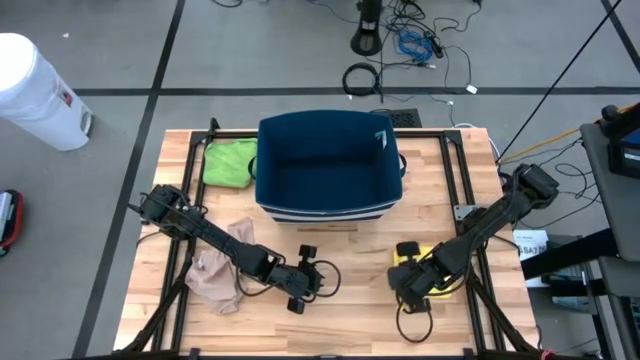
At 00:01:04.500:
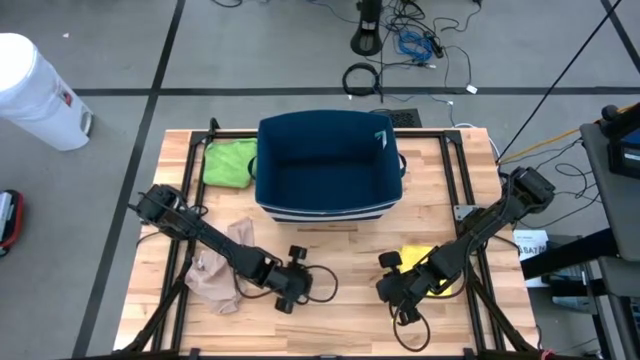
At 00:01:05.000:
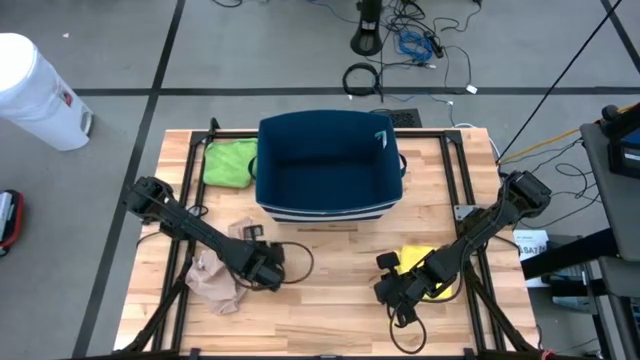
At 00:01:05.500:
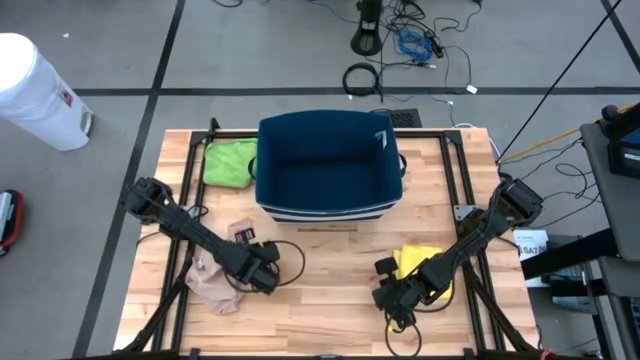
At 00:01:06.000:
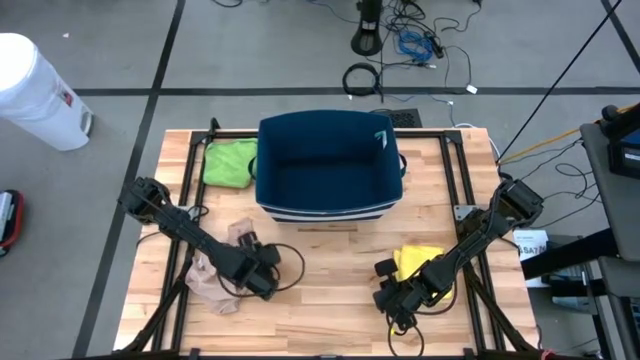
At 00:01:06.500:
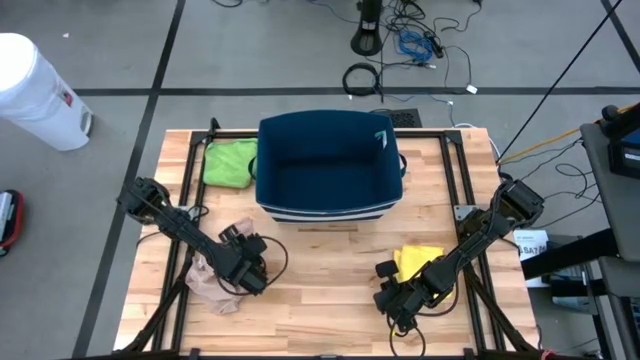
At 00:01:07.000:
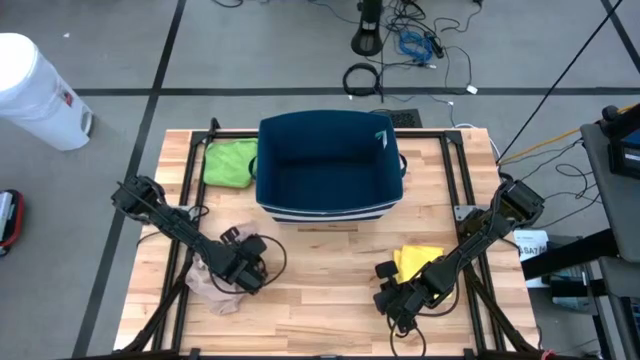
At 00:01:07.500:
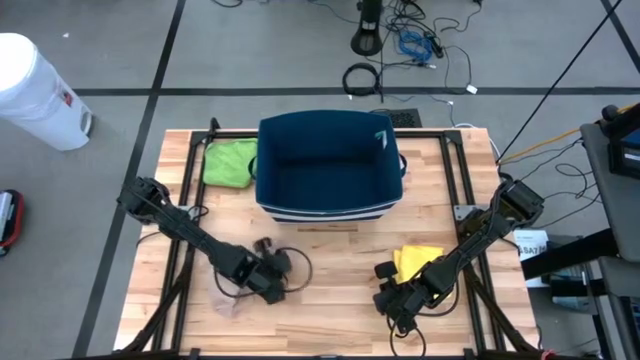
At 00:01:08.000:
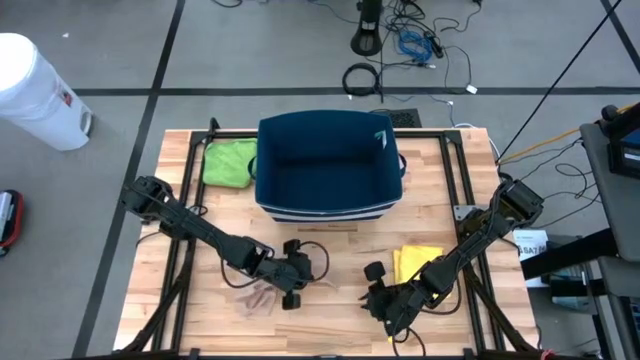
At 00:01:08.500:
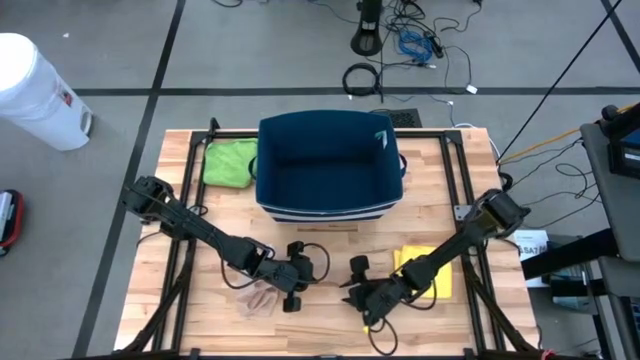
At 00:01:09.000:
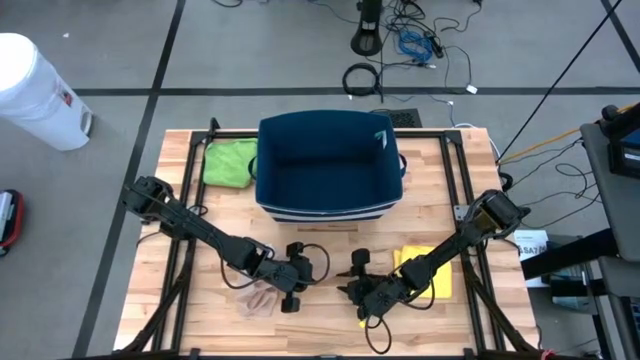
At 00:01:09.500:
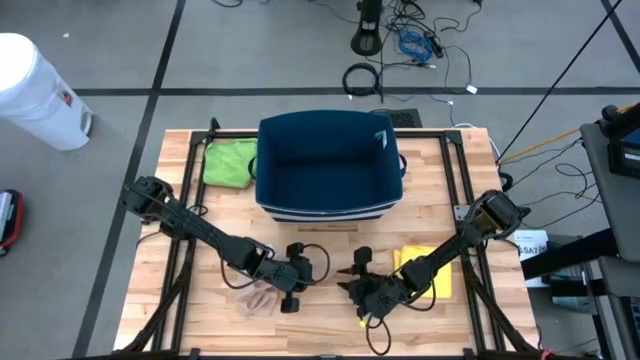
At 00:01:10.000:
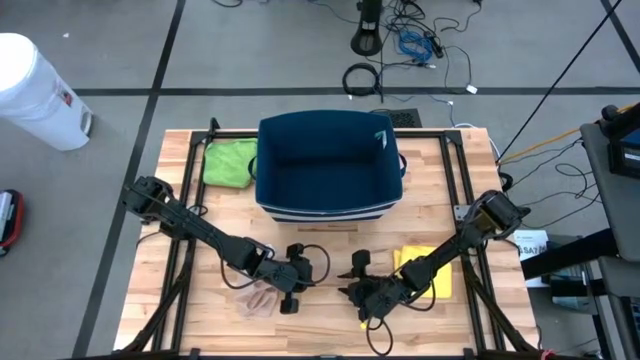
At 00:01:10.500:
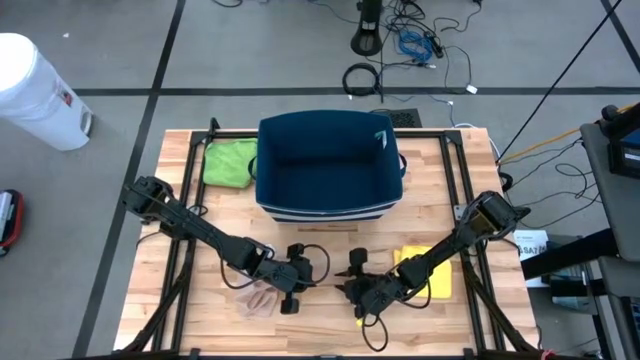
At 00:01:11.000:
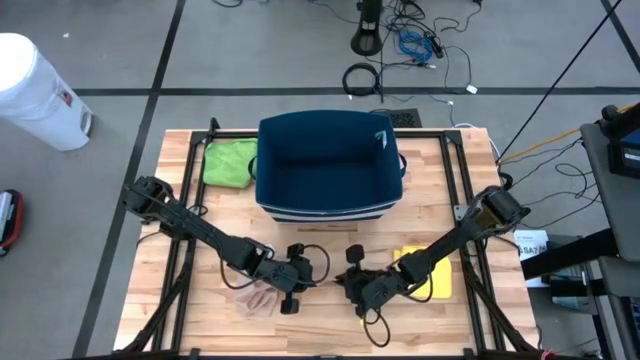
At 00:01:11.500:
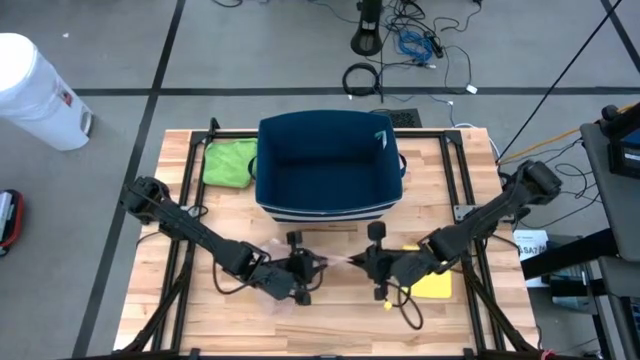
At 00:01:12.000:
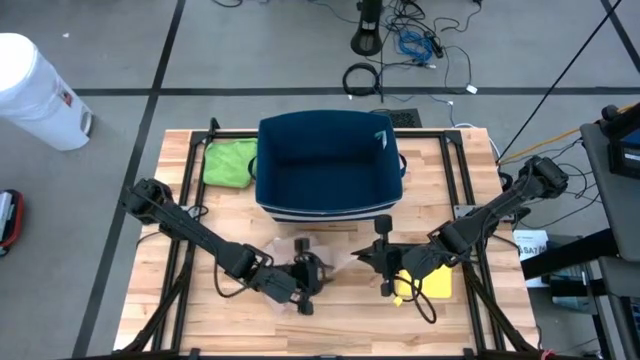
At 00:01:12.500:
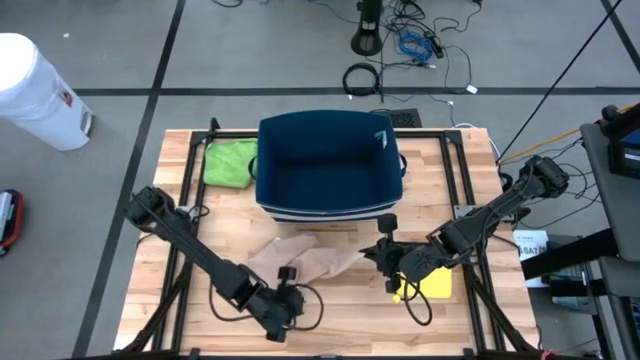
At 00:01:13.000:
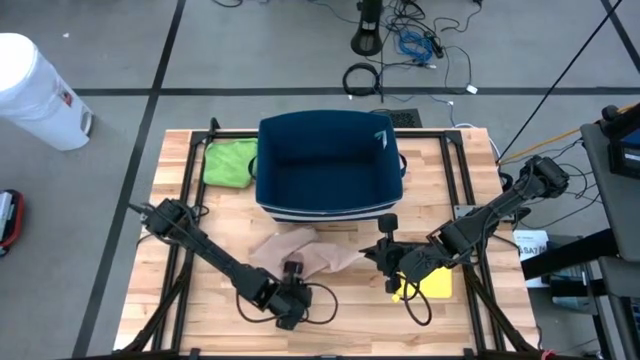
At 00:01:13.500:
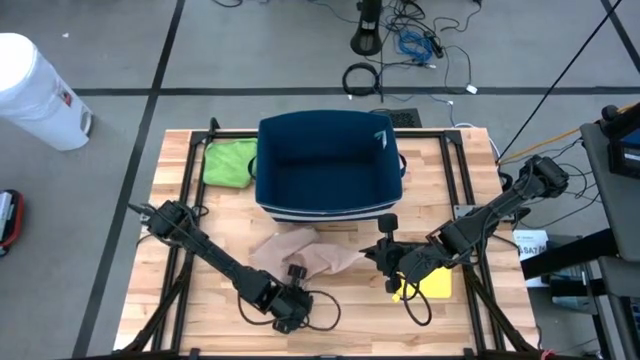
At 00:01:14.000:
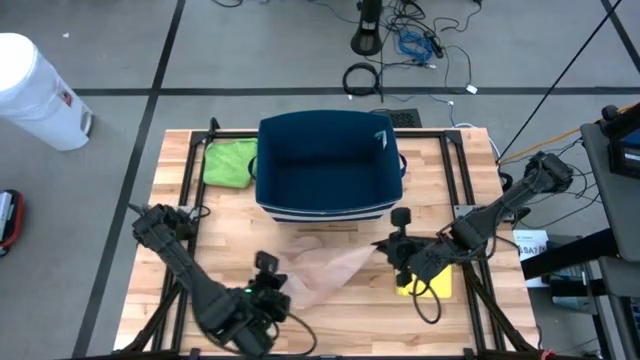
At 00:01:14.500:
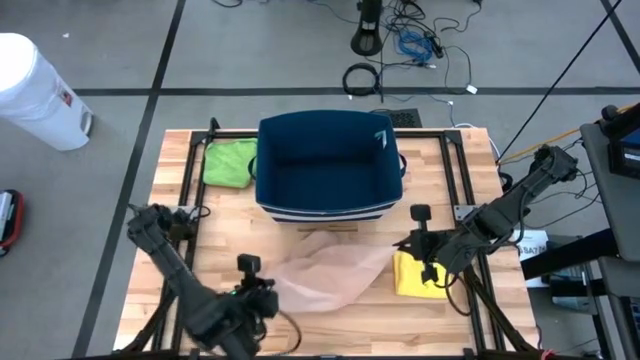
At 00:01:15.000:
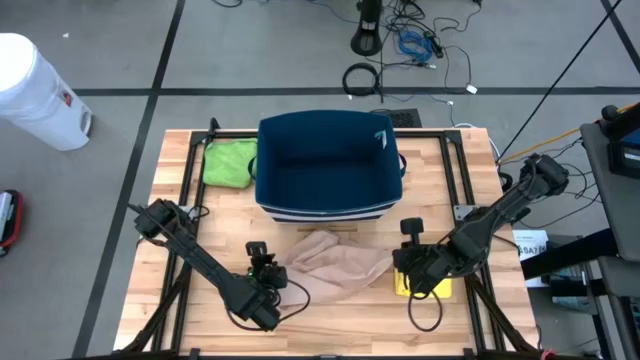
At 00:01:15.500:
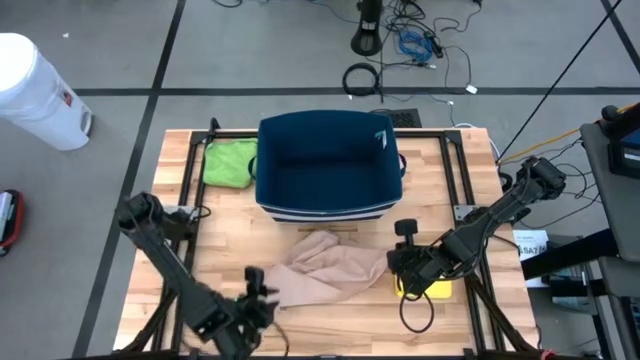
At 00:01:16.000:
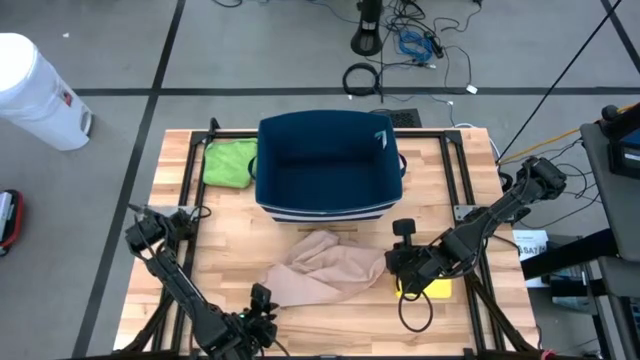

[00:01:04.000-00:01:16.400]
Task: Fold towel
Fold the light brown towel

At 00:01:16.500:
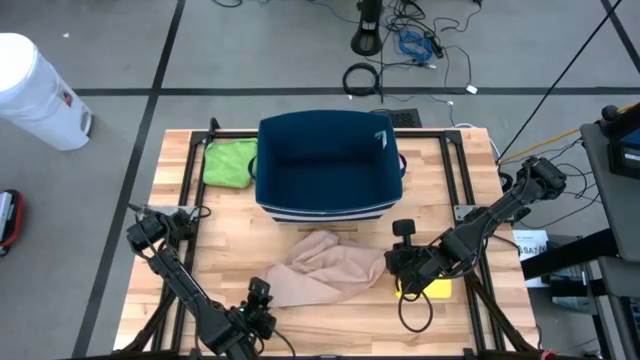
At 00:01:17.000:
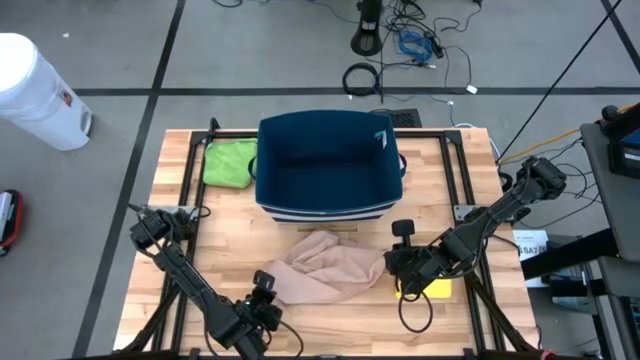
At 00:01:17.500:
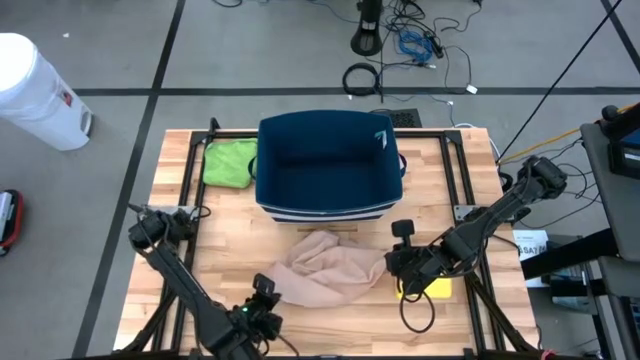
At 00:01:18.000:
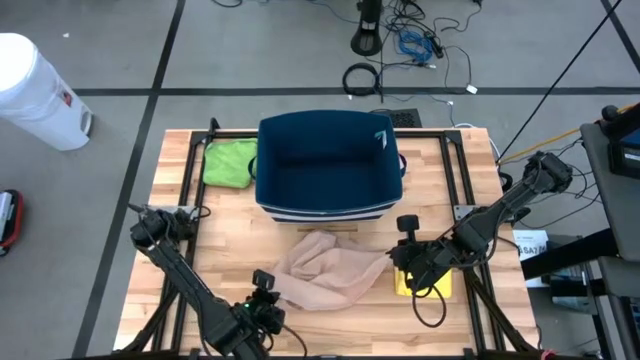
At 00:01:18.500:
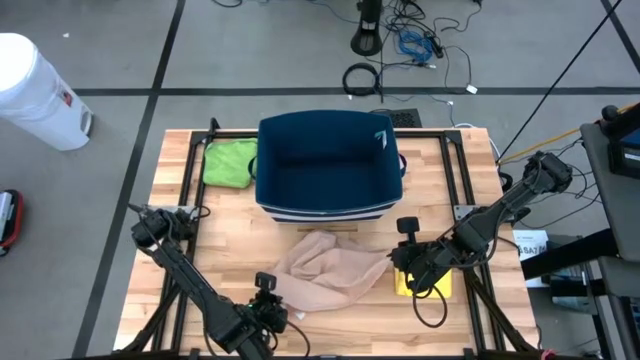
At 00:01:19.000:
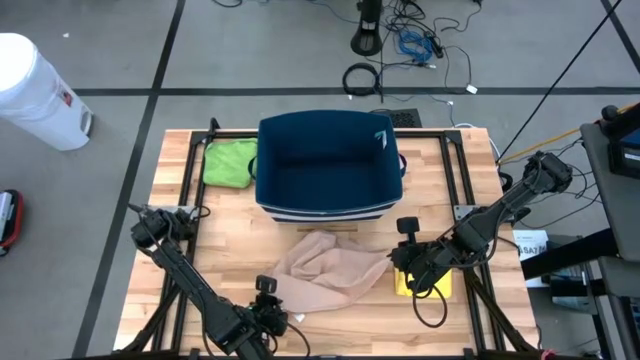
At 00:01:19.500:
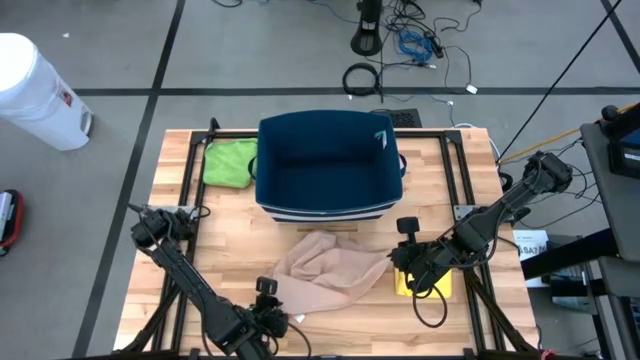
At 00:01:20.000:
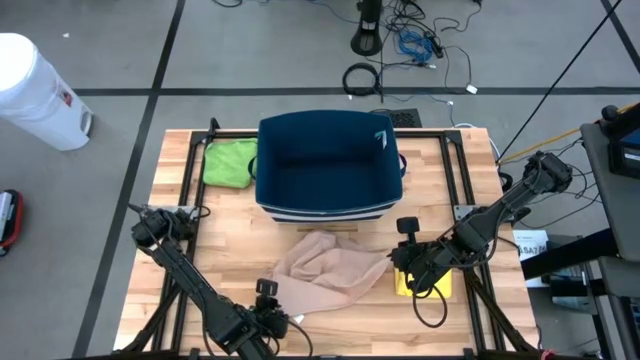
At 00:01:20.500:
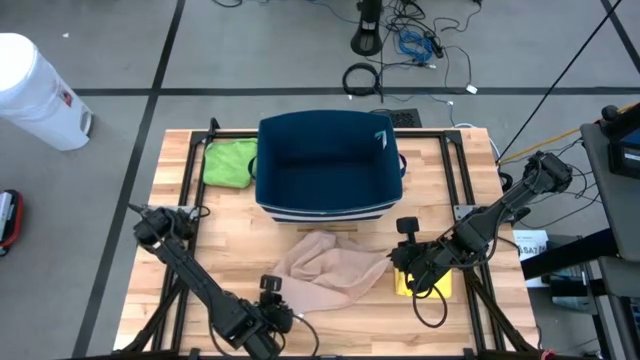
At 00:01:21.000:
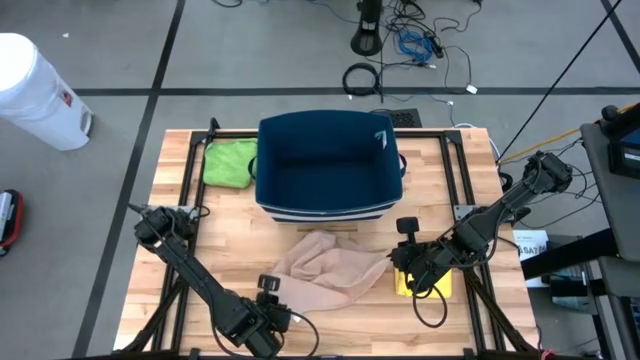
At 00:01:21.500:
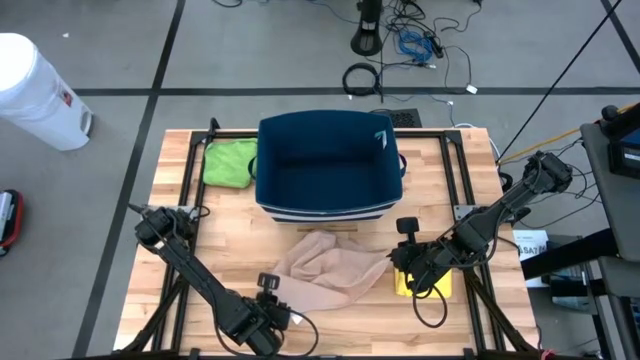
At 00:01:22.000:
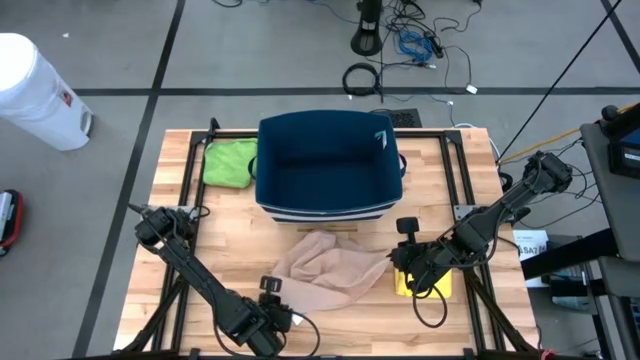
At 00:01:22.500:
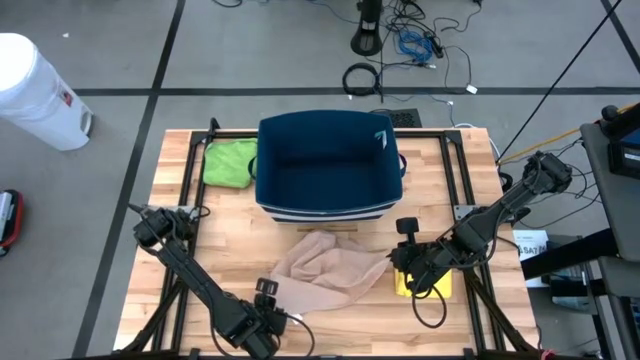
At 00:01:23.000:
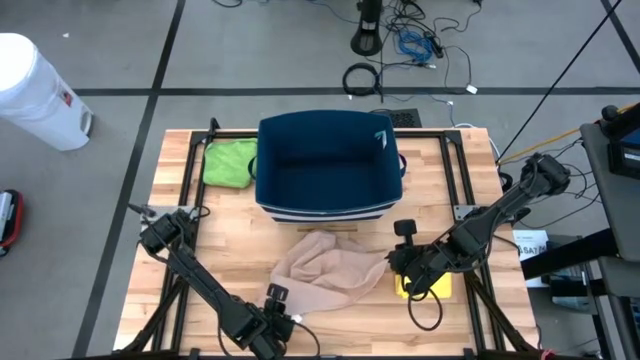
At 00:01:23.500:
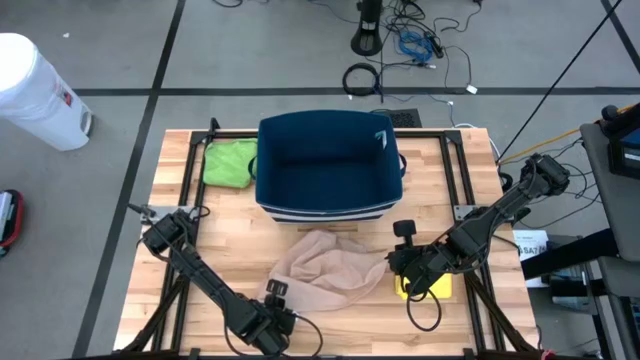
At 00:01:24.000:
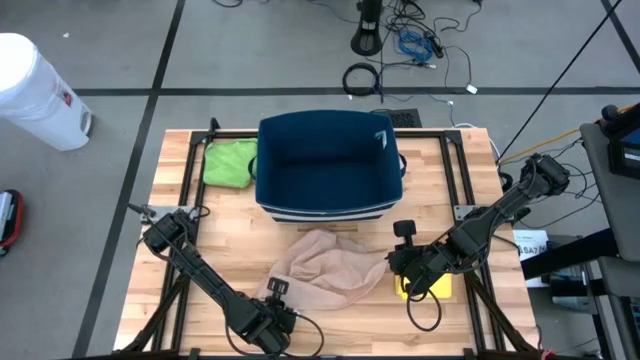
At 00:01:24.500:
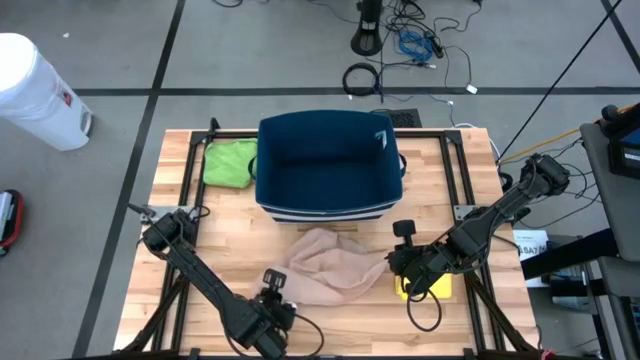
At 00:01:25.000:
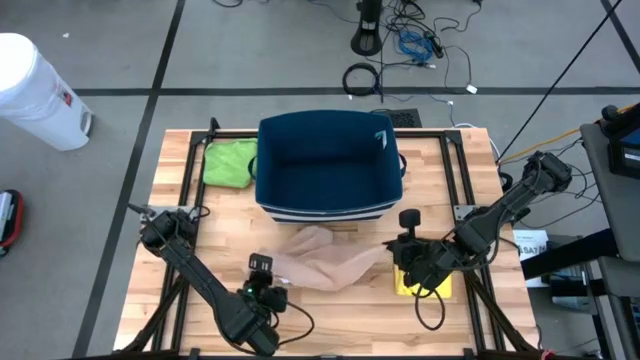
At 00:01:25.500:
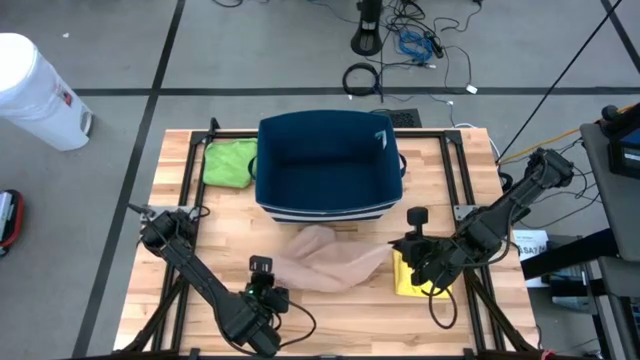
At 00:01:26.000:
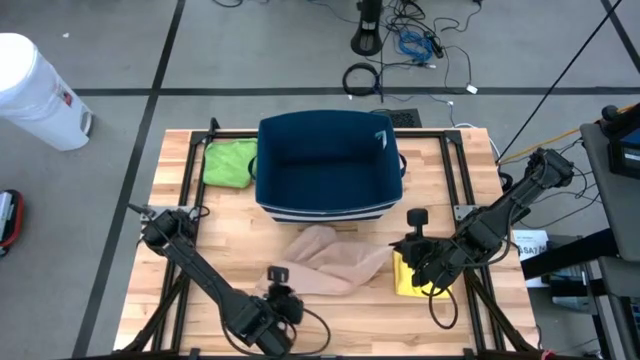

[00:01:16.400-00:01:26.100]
Fold the light brown towel
